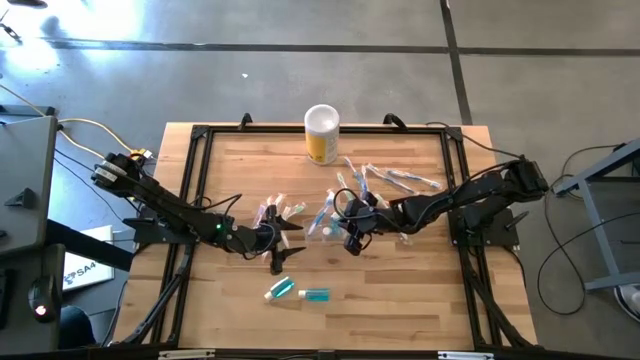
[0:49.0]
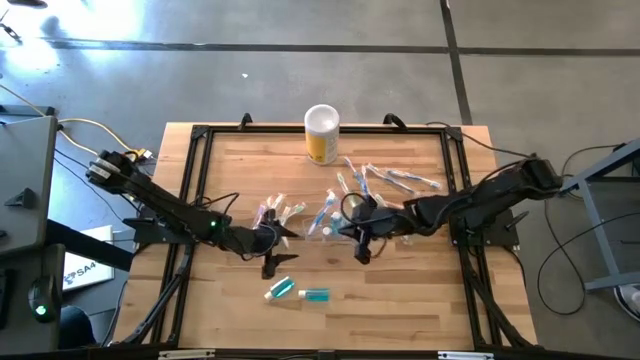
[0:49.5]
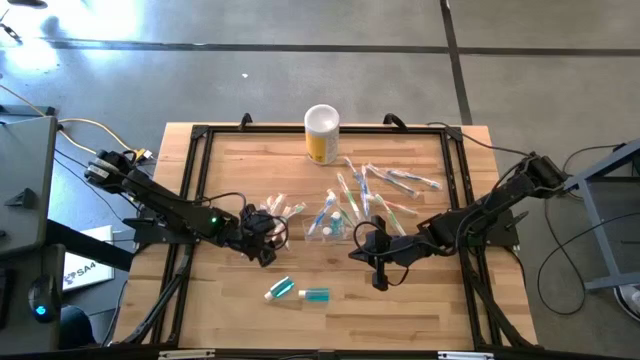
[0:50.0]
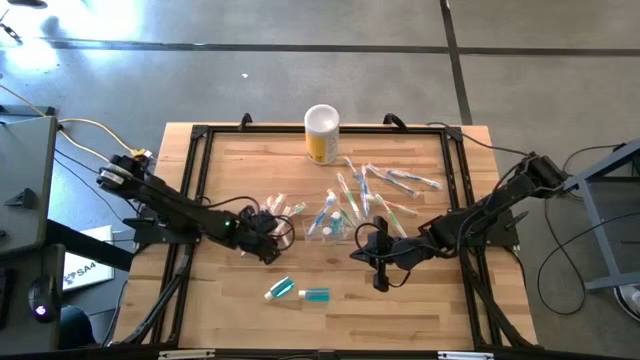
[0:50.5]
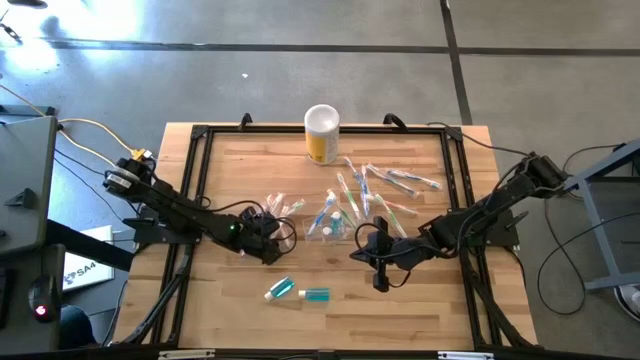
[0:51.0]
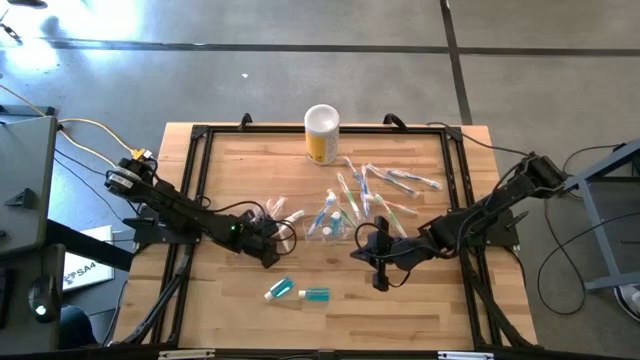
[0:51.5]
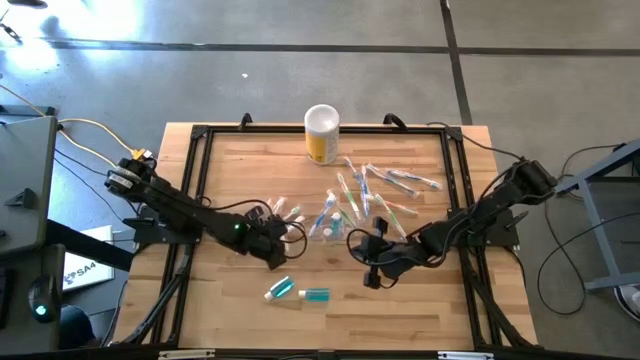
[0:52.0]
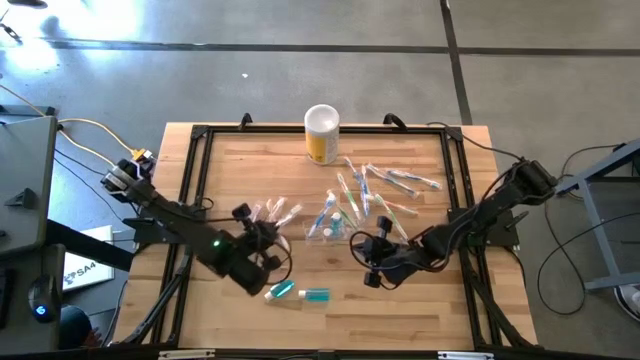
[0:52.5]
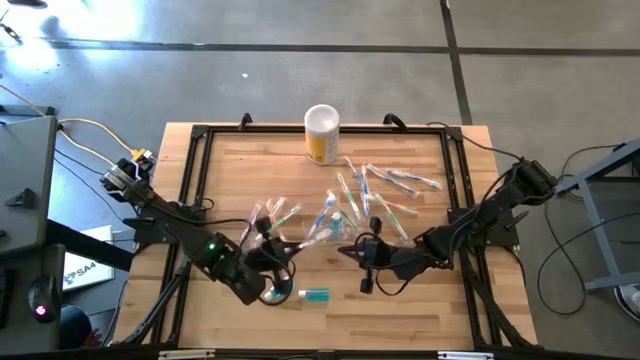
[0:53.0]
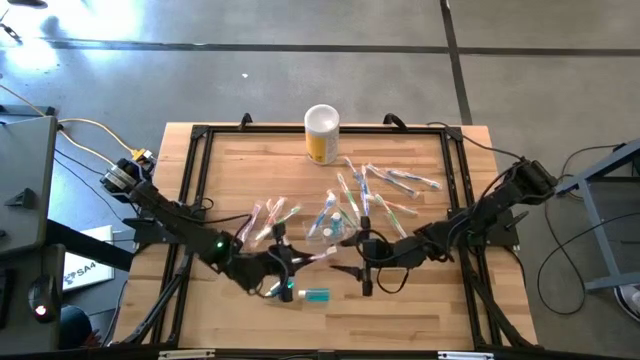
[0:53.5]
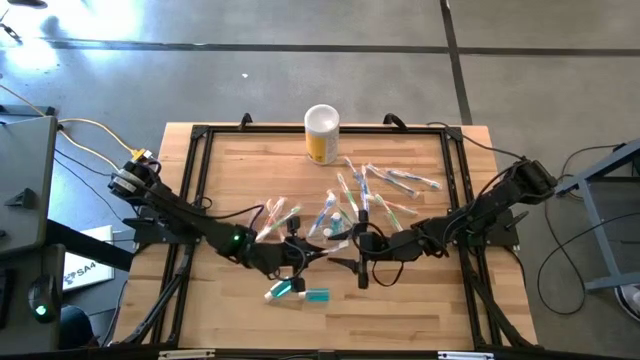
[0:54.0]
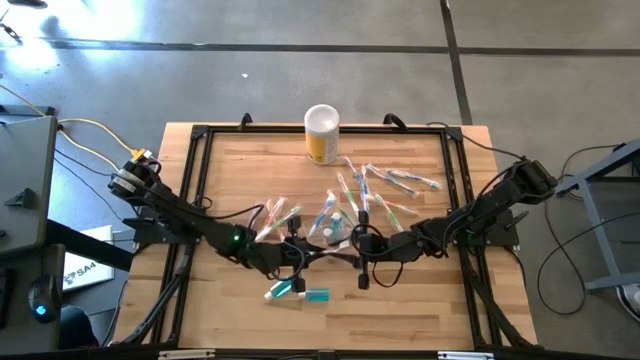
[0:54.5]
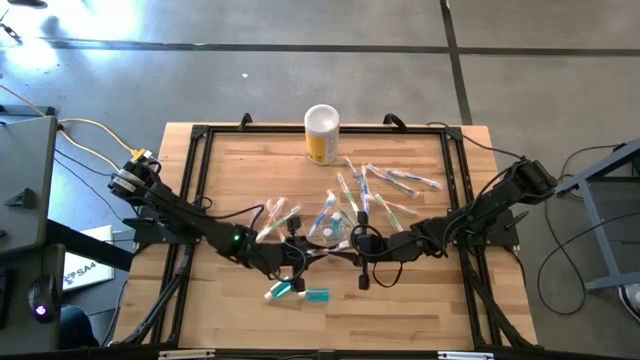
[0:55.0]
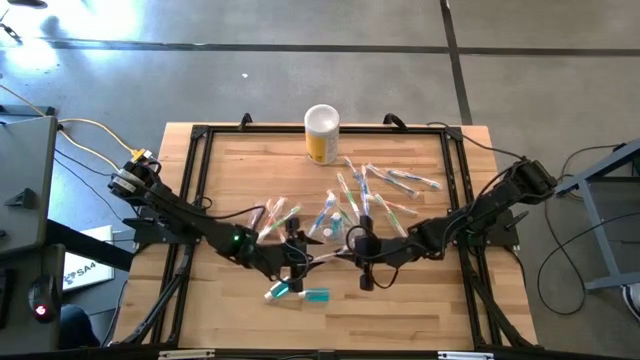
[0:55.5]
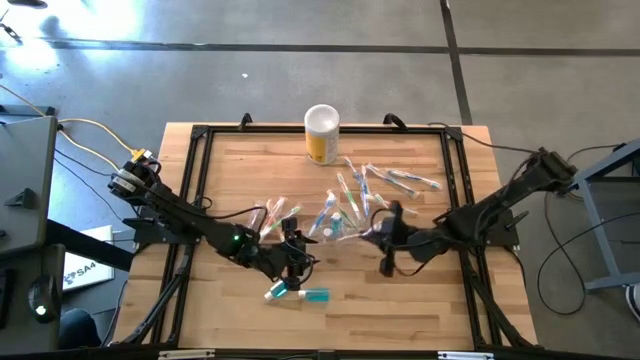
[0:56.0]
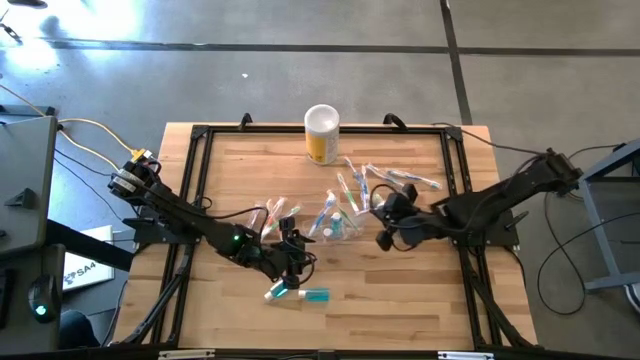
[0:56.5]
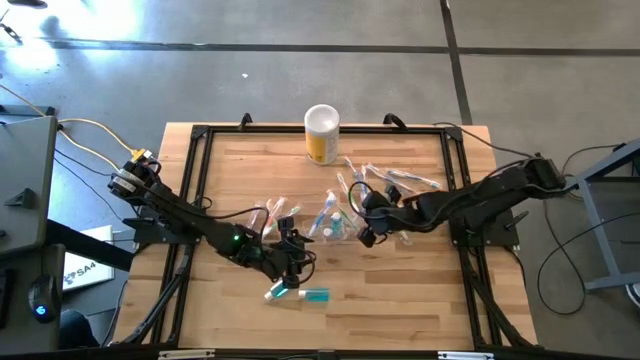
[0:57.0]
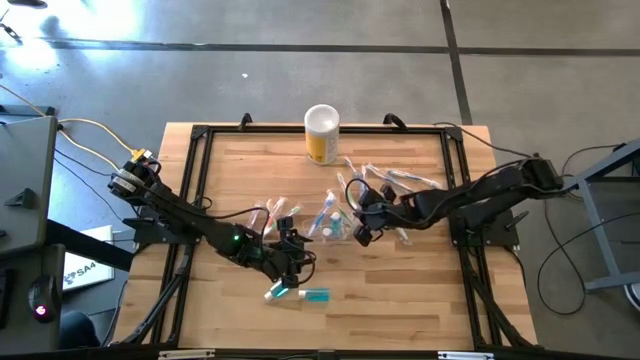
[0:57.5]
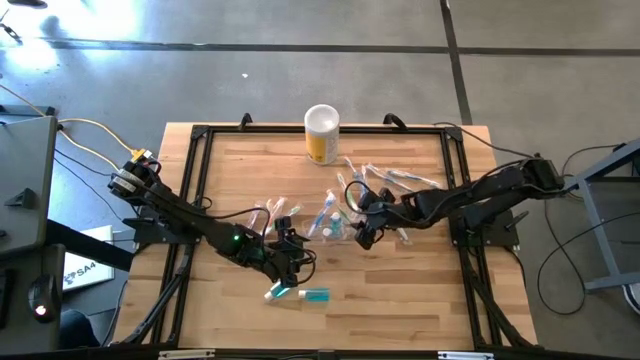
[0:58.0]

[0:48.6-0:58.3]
Task: Pick & Place toothbrushing station
Put the orange toothbrush in the transparent organizer

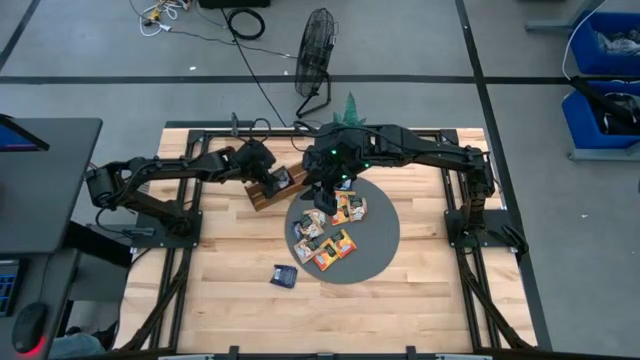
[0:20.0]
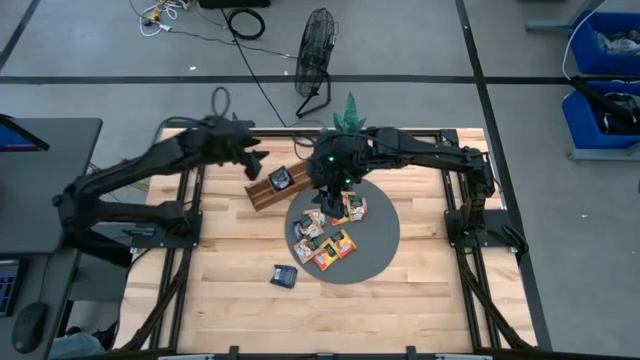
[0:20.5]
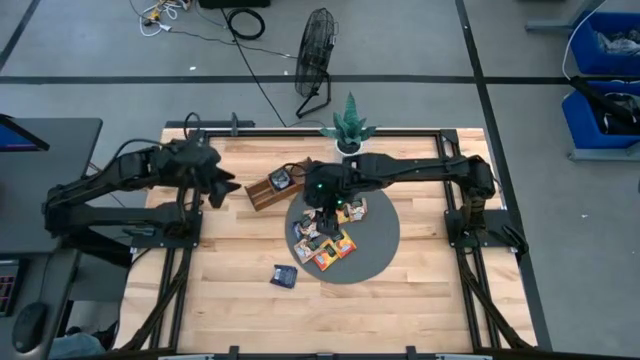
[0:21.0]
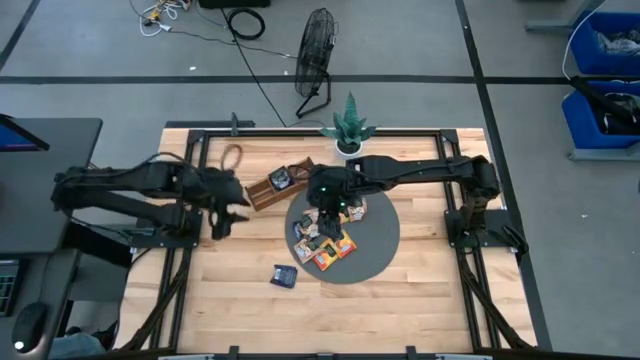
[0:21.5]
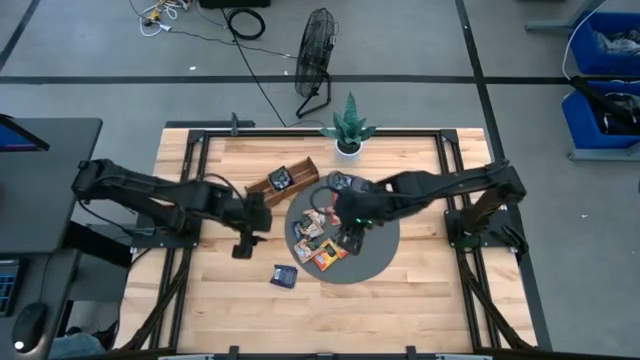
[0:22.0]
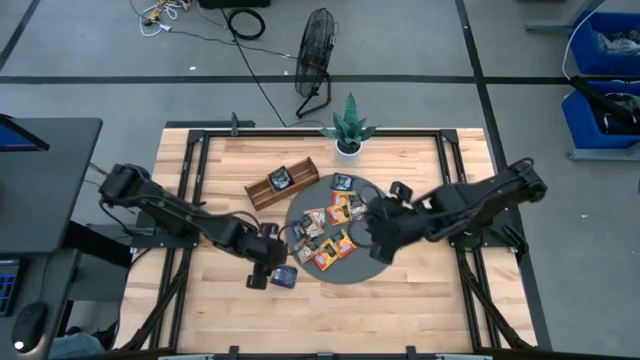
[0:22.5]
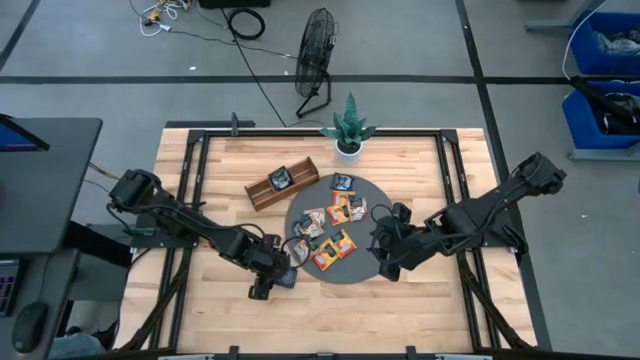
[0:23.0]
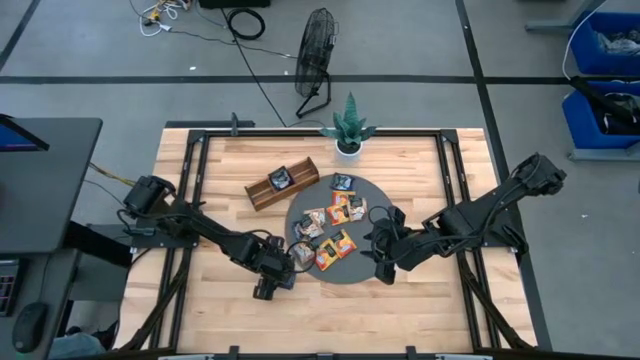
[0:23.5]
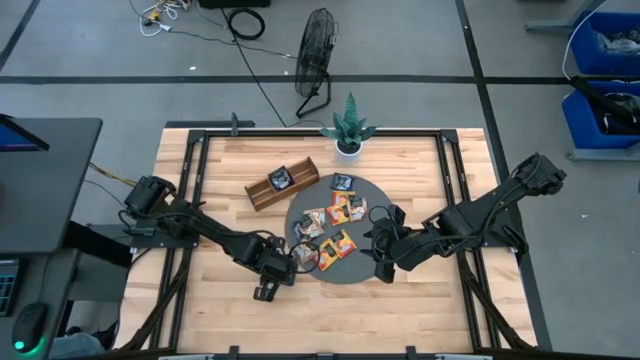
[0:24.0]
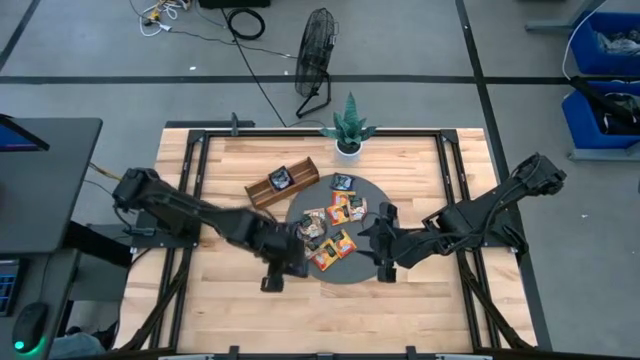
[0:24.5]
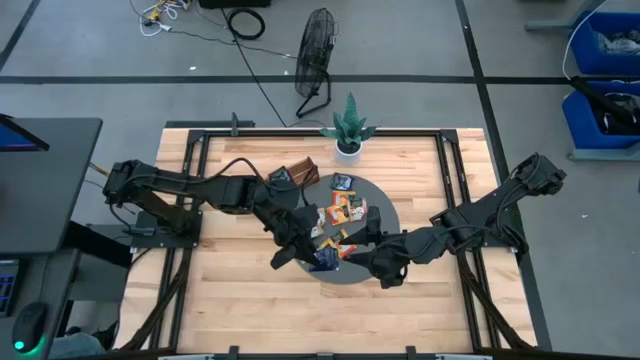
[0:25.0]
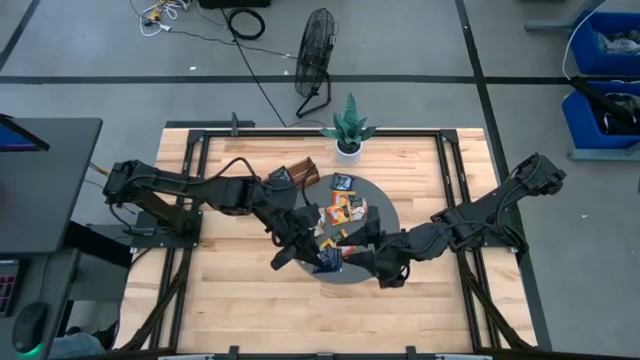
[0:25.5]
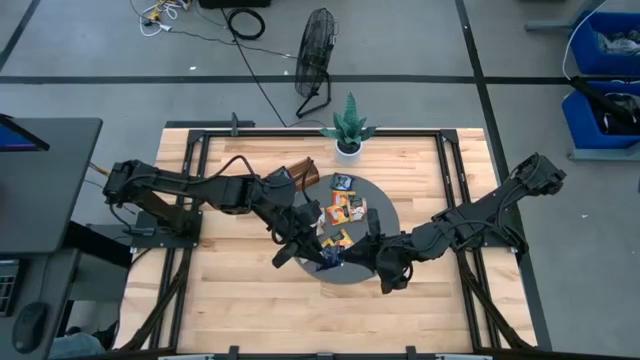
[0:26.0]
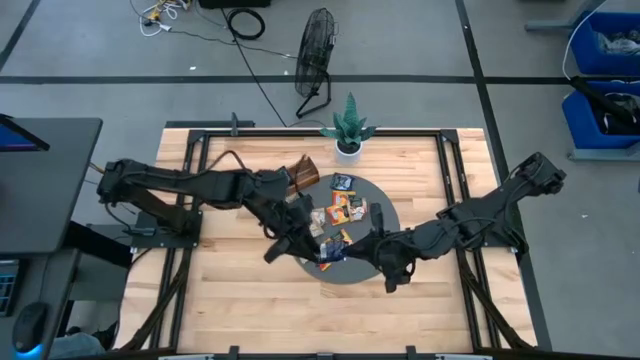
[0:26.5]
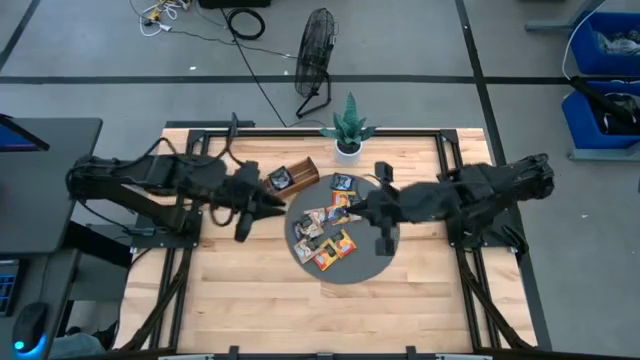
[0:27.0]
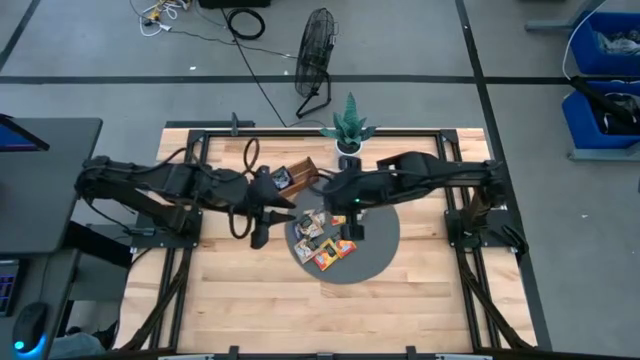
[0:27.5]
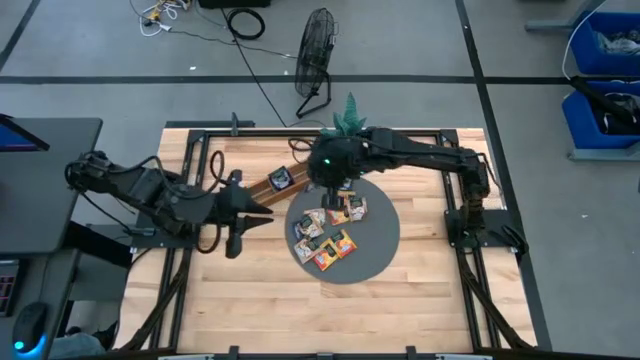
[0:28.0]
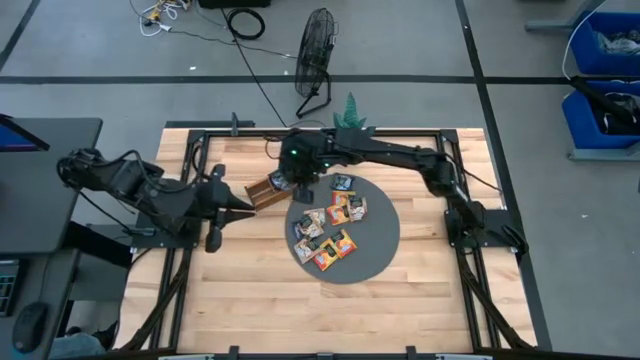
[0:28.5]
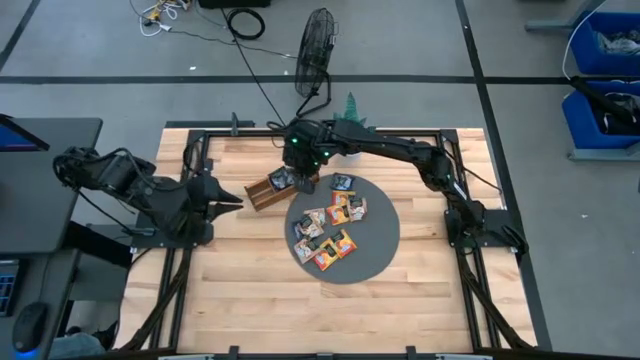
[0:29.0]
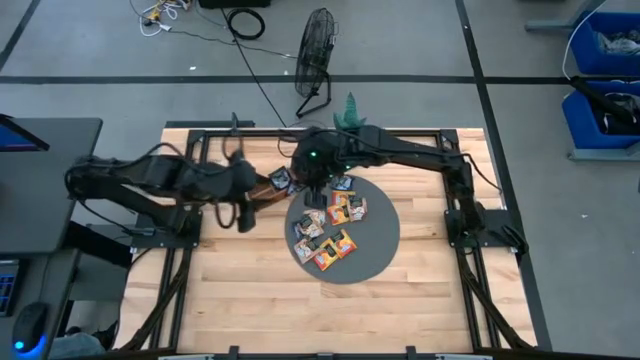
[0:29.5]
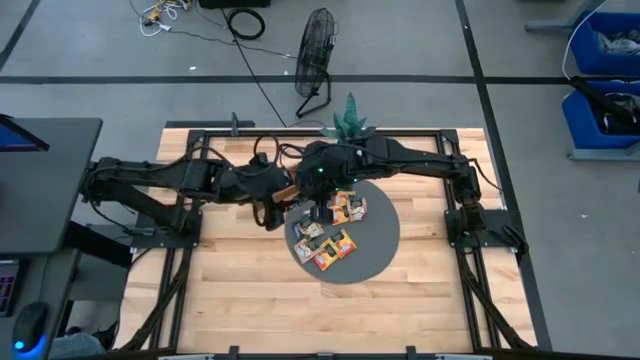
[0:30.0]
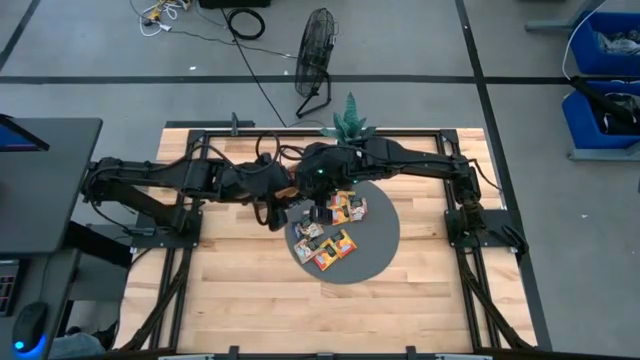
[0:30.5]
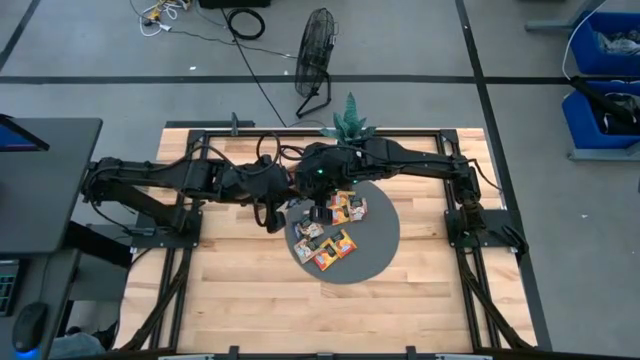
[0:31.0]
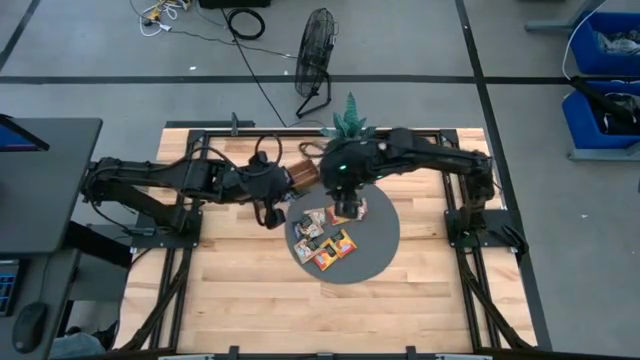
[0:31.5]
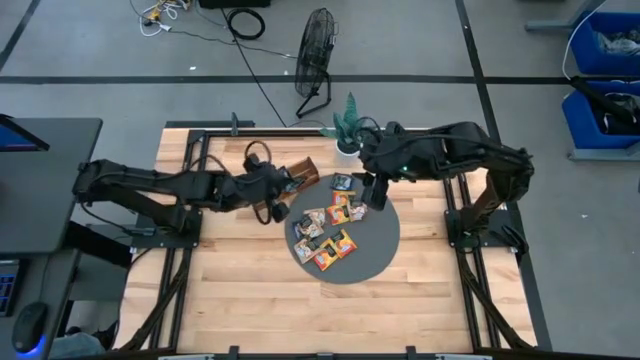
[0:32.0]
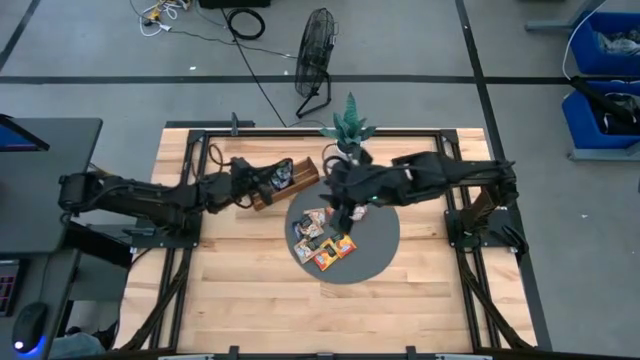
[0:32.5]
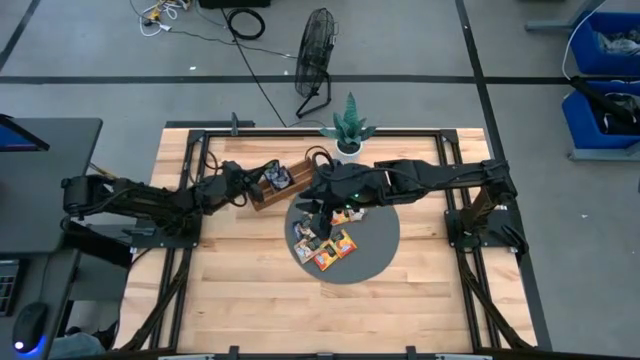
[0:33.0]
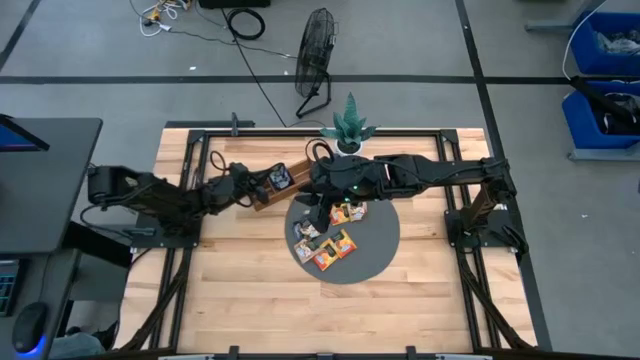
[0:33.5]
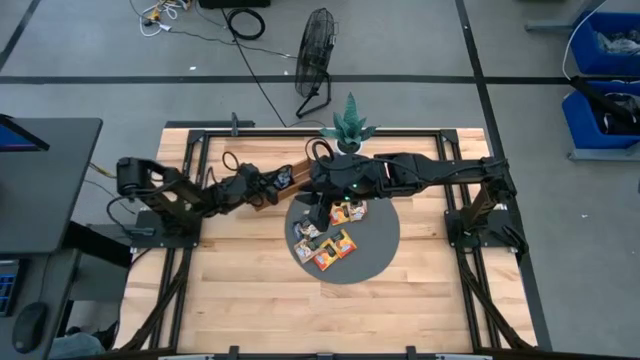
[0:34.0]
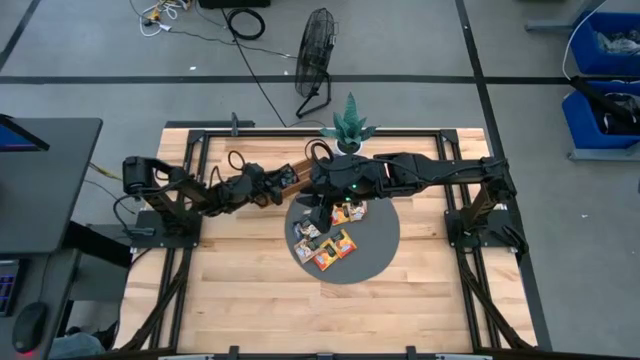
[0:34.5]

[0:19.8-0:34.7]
Task: Pick & Place Tea
Put the purple tea bag into the middle section of the wooden organizer
